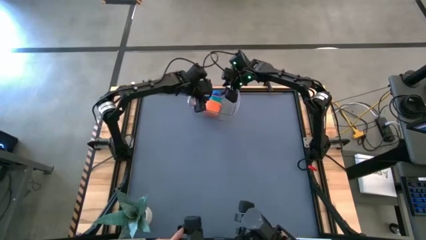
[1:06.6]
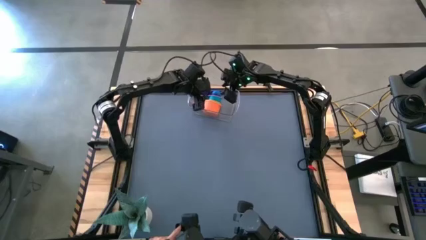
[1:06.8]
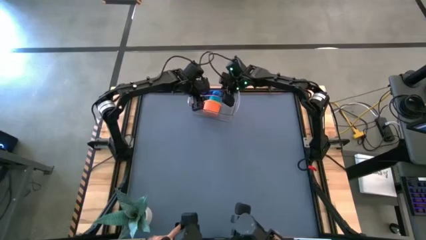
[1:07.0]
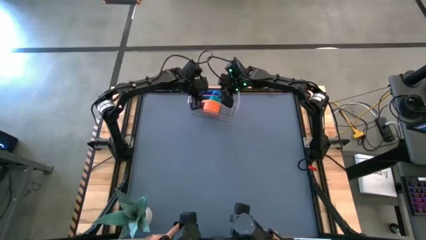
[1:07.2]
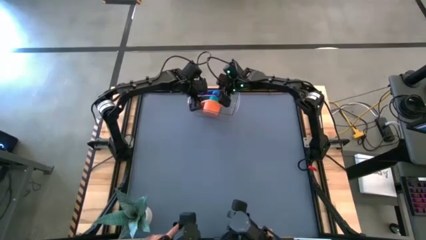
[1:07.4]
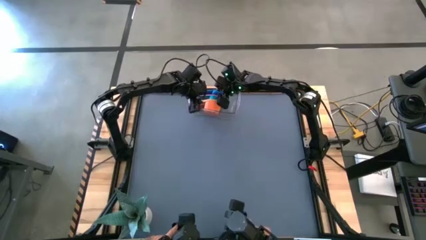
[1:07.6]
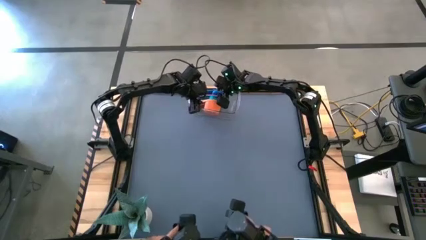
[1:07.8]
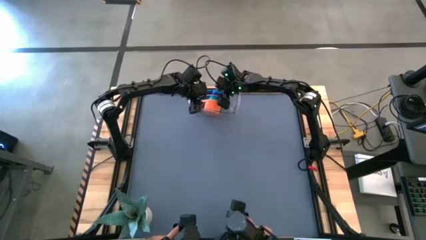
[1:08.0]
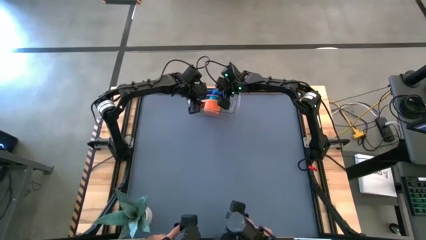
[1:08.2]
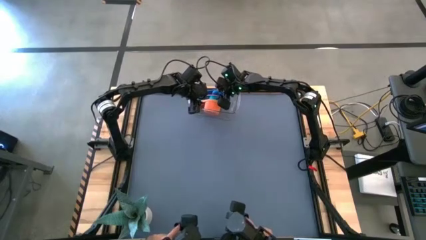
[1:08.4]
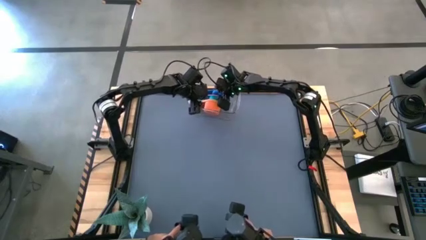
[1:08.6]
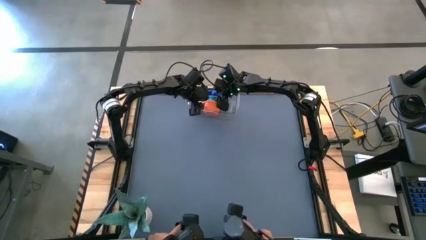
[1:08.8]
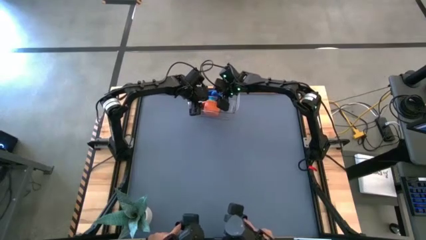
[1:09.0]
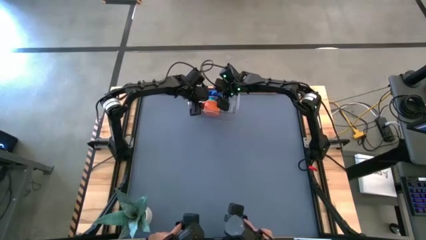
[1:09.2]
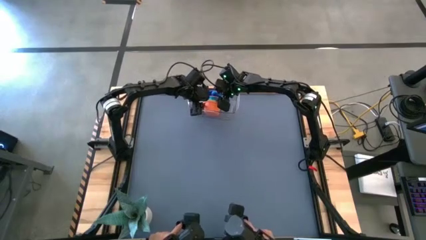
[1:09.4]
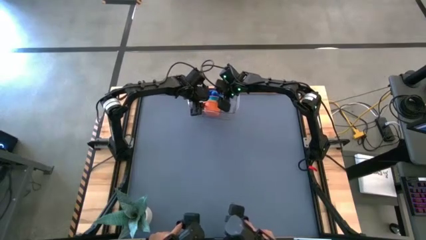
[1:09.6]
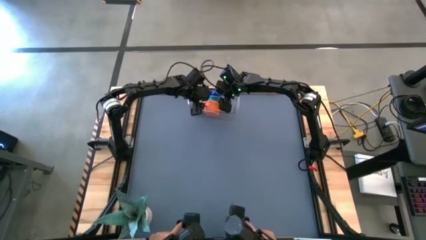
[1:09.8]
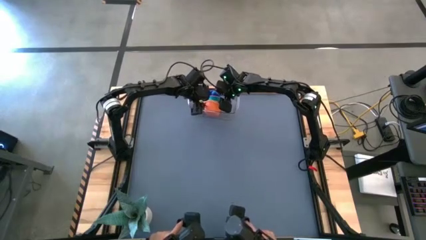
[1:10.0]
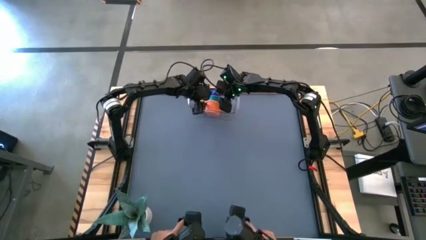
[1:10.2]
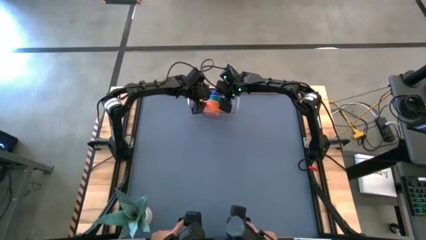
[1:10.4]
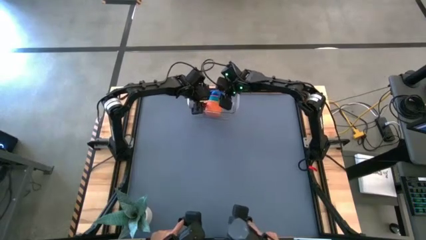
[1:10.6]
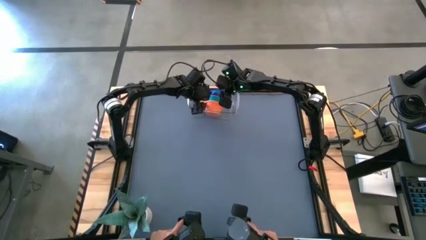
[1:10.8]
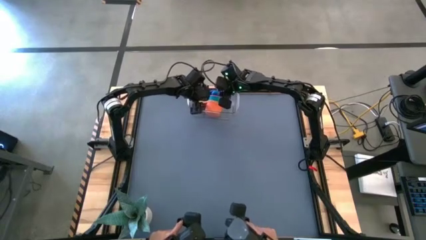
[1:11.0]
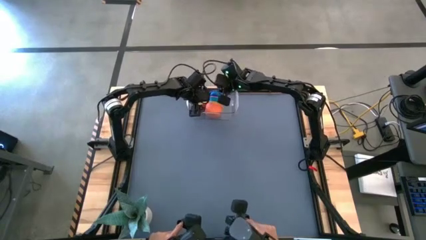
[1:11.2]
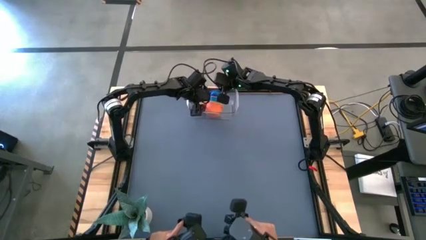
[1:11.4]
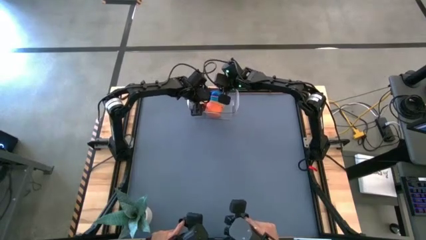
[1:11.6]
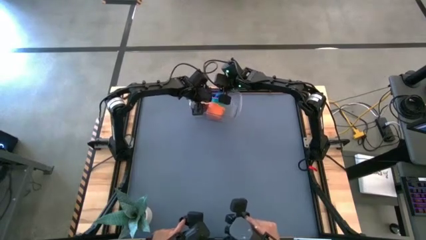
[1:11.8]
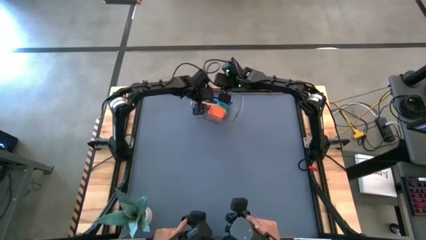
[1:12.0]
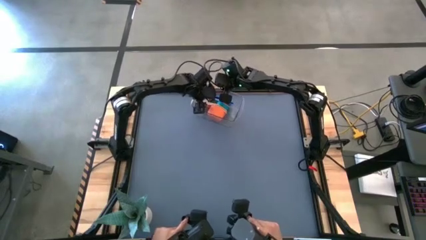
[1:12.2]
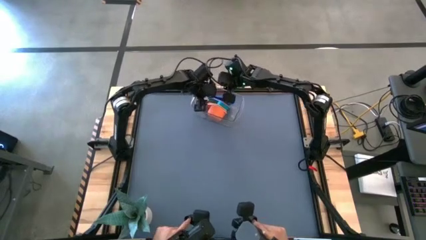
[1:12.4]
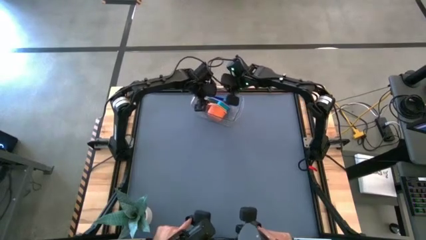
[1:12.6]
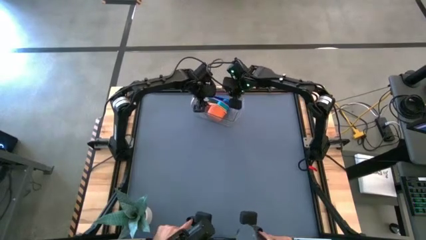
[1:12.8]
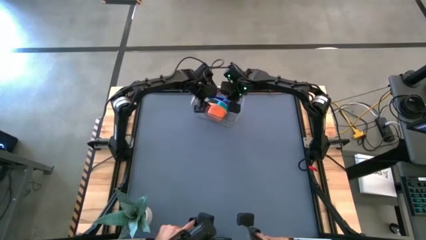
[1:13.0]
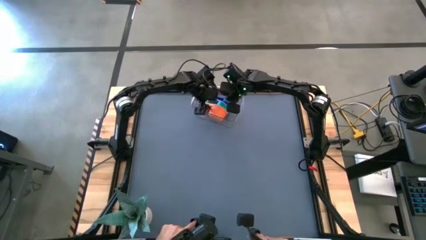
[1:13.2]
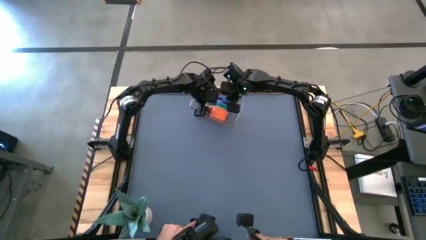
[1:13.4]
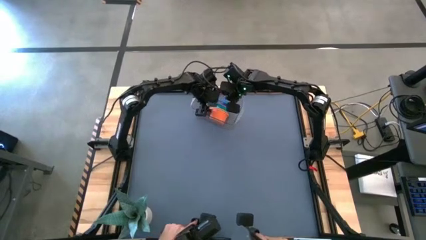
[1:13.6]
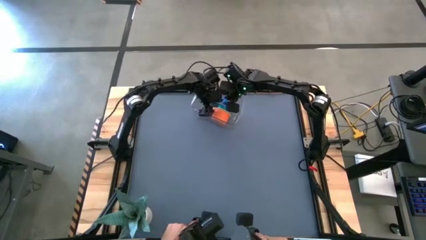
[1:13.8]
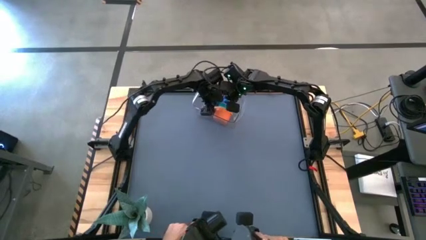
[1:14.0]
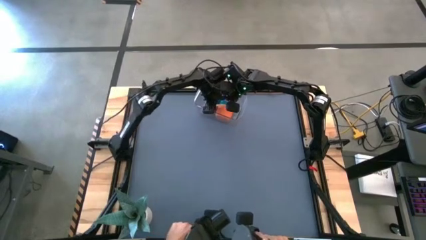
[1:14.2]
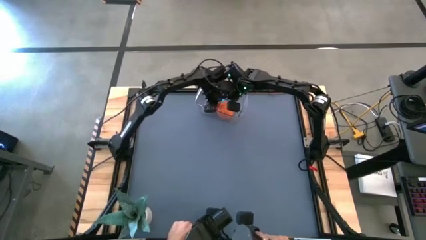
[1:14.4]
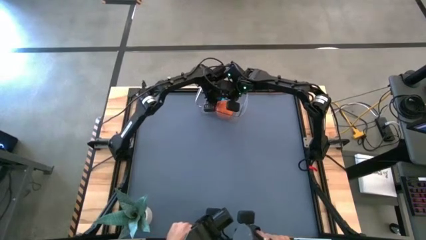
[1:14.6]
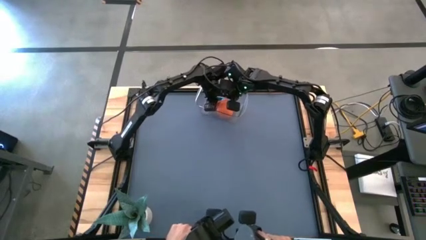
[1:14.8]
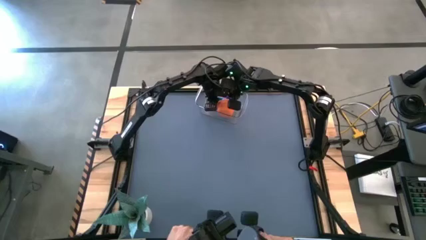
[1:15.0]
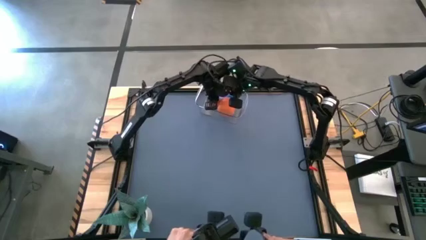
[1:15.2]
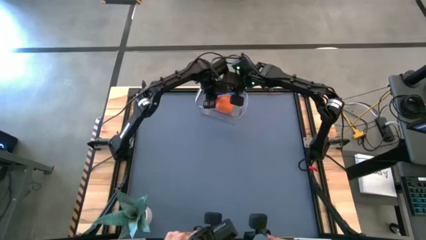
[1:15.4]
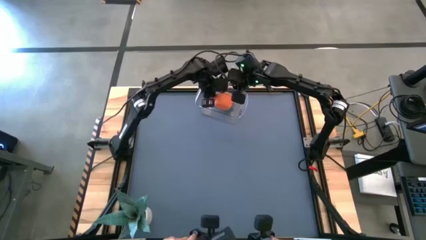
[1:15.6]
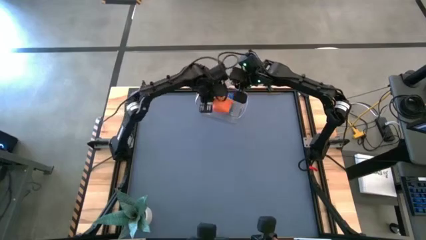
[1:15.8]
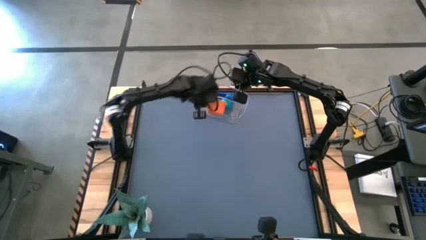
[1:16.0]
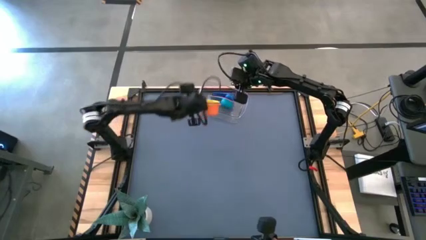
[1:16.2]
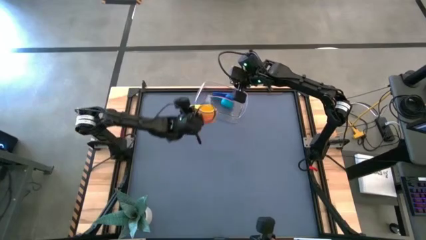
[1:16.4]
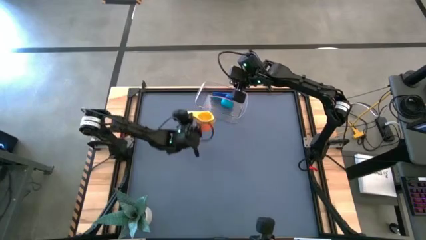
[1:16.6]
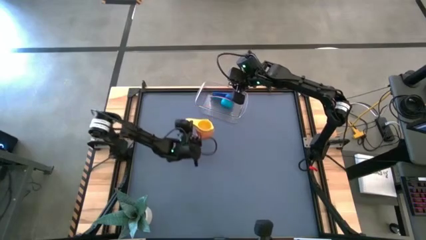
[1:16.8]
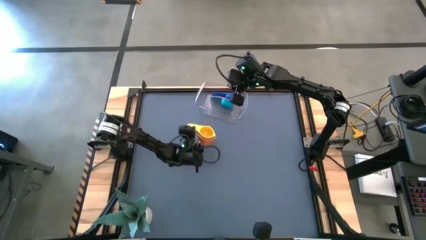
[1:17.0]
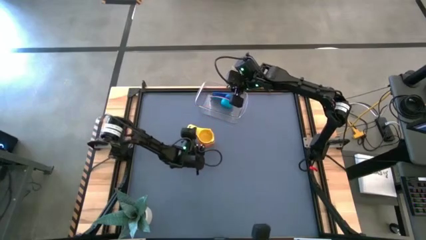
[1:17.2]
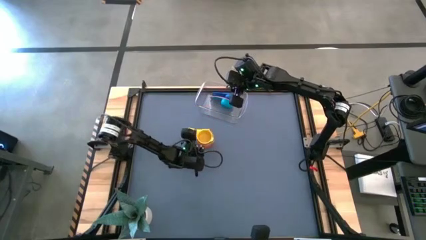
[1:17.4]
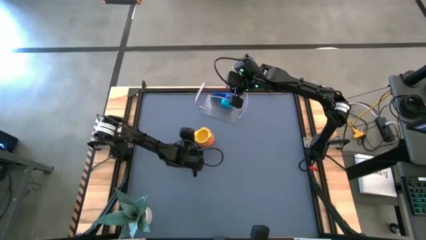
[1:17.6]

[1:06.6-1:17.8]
Task: Nest measuring cups in basket
Remove the stacked measuring cups from the transparent bin

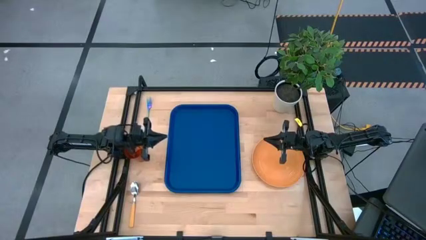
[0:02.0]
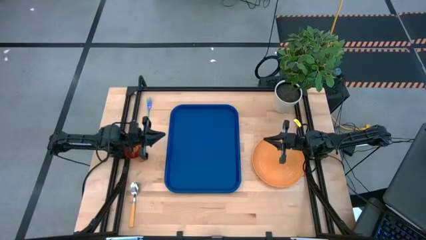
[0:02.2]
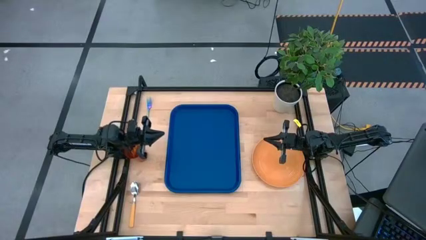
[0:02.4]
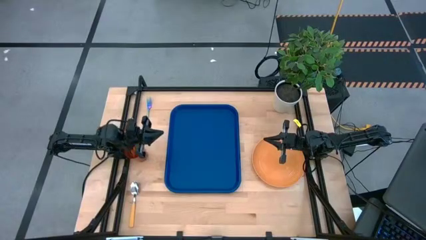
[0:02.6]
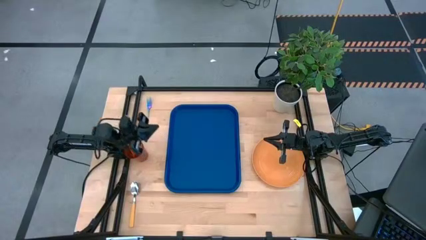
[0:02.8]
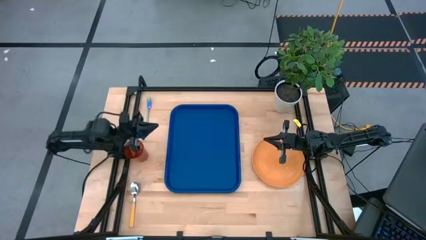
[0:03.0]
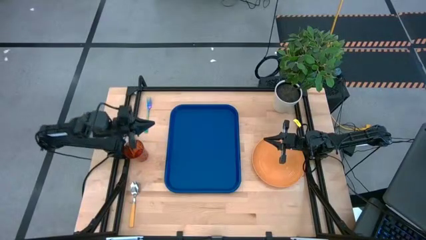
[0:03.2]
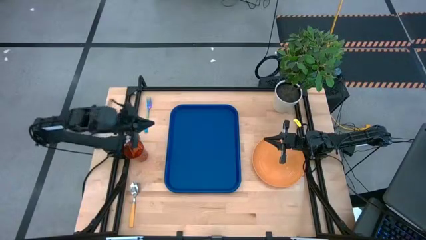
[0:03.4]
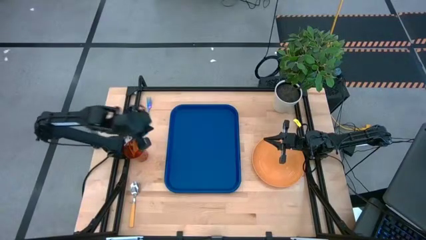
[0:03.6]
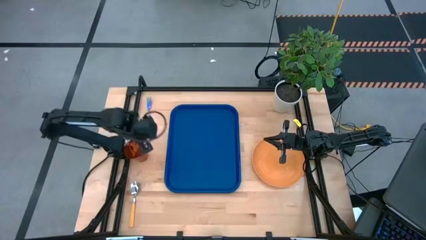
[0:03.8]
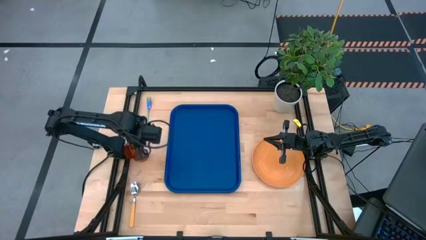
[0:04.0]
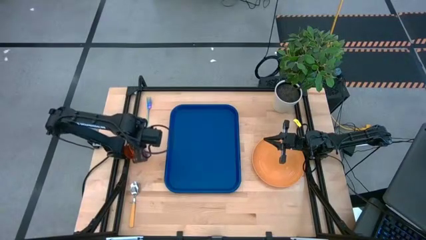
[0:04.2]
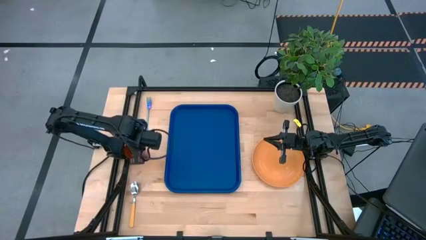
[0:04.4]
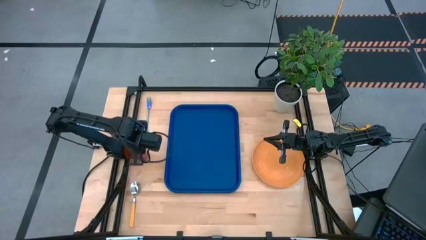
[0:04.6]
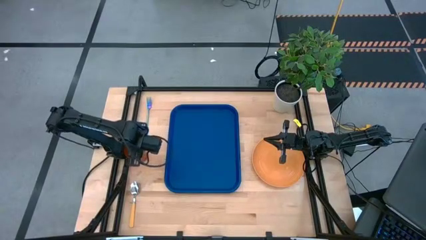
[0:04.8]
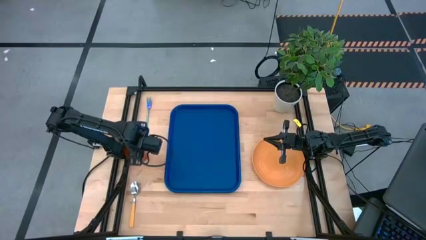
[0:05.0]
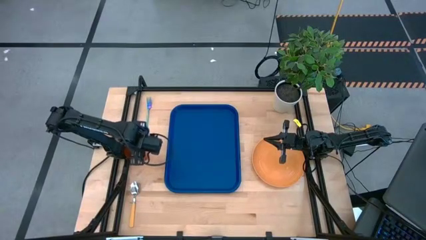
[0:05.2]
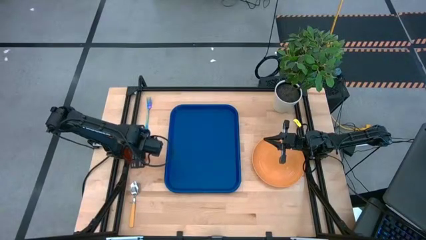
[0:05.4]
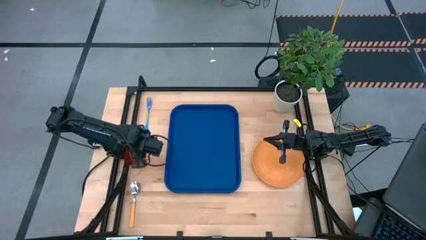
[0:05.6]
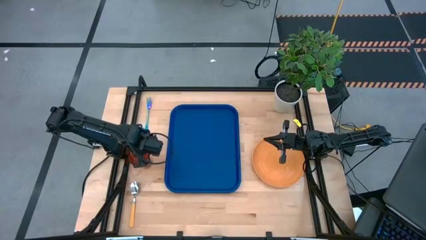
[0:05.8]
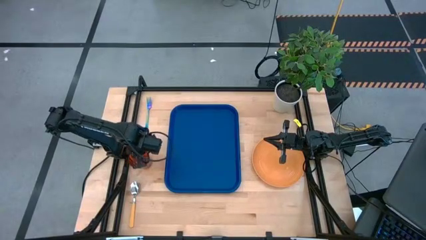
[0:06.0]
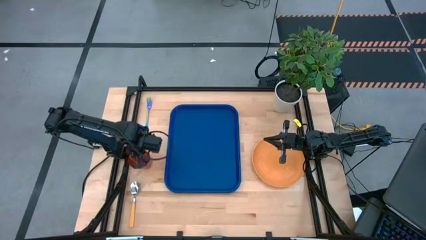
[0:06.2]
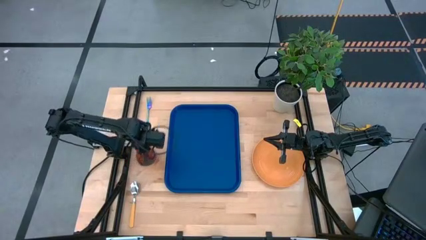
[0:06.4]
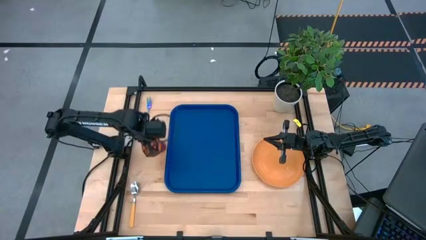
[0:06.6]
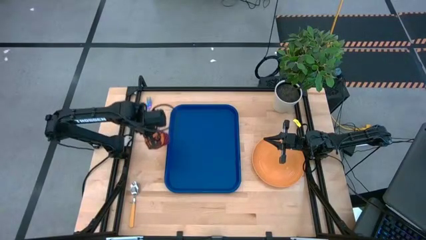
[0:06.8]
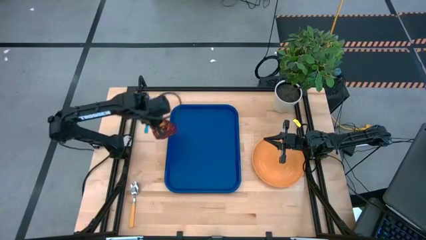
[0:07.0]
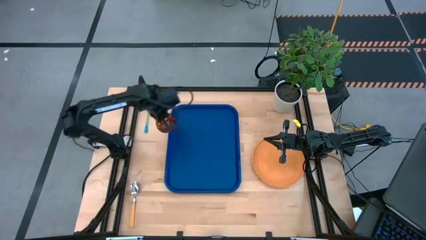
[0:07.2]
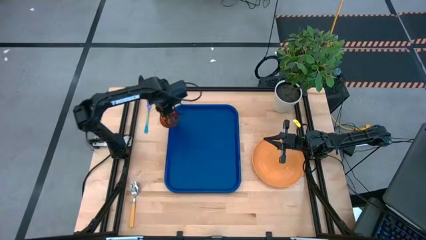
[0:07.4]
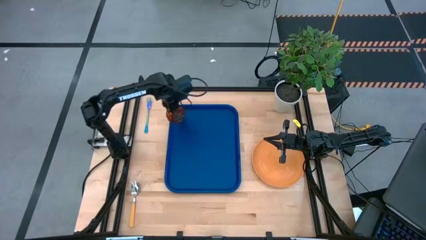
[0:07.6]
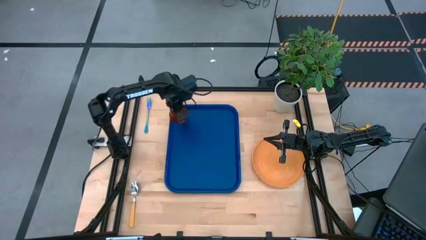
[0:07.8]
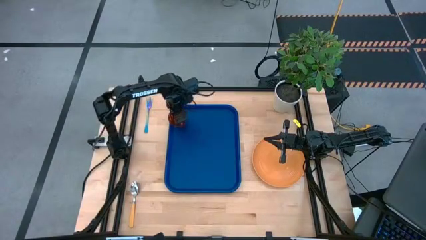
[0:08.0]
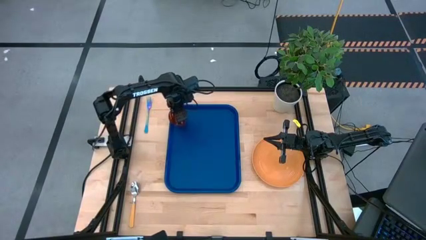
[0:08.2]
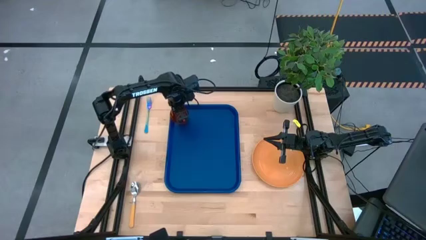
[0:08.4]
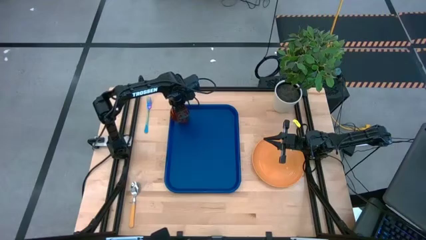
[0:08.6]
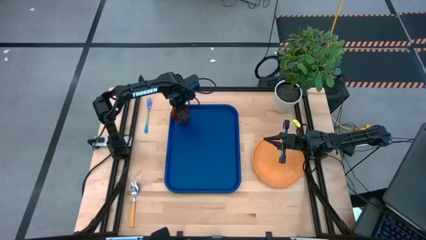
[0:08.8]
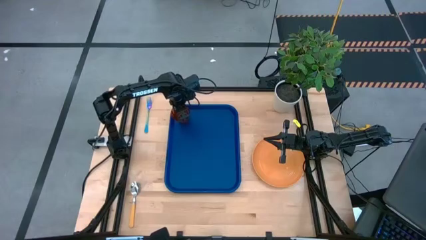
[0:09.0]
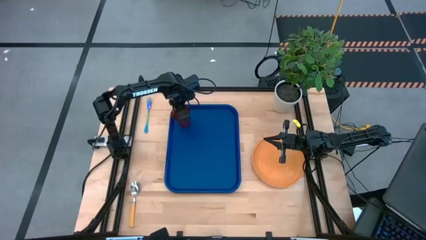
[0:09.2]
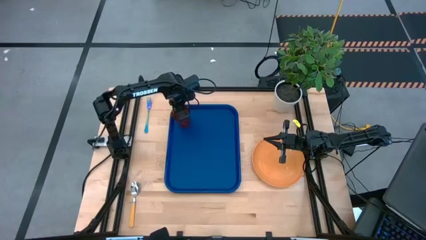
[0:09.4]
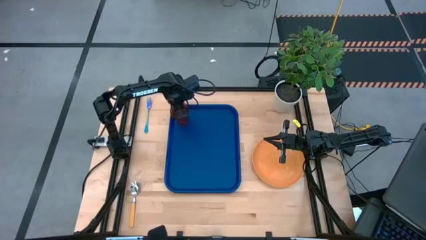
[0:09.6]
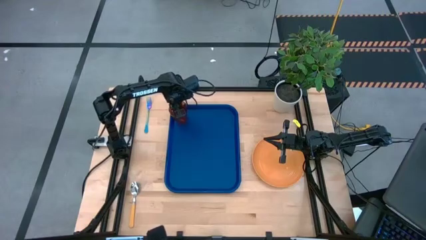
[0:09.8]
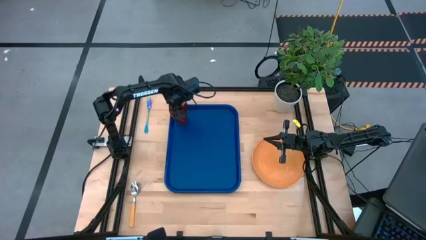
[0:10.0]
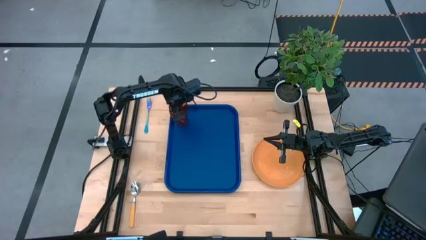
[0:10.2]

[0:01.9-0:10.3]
Task: Pick and place plate/cup/fork/spoon on tray
Put the brown glass on the blue tray
